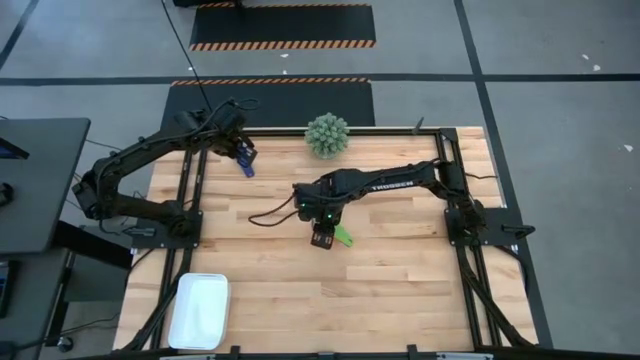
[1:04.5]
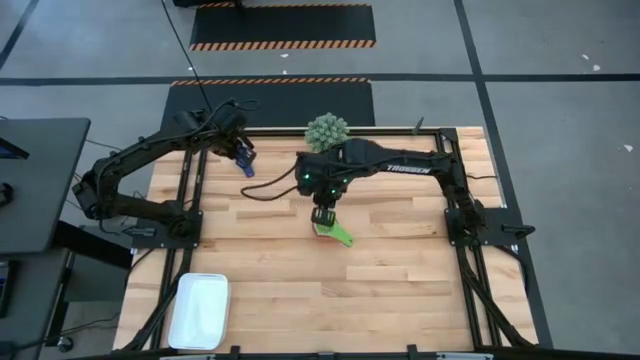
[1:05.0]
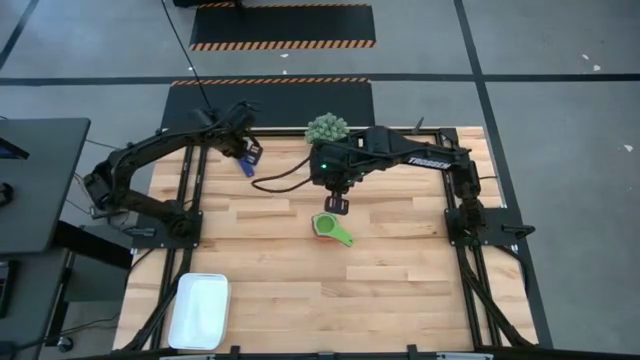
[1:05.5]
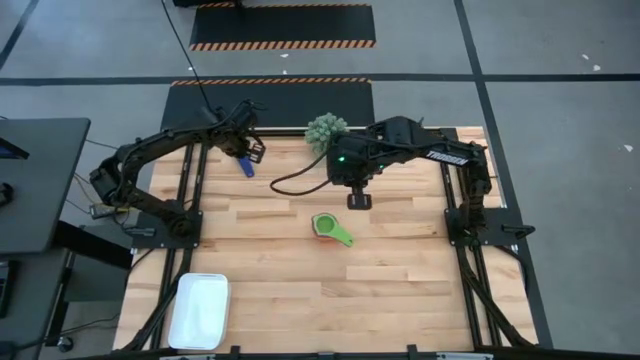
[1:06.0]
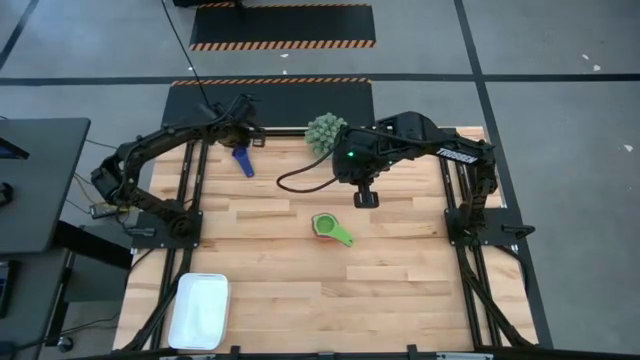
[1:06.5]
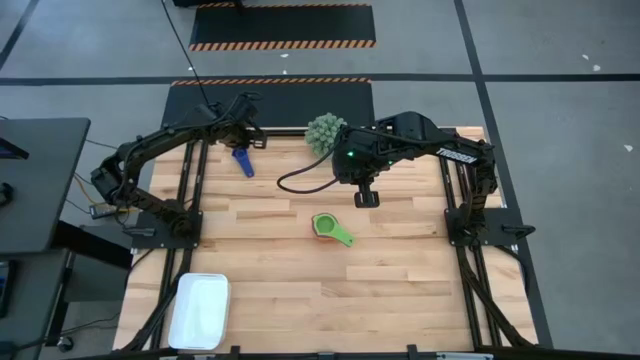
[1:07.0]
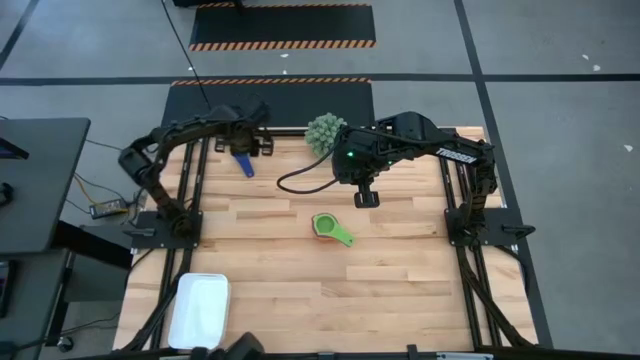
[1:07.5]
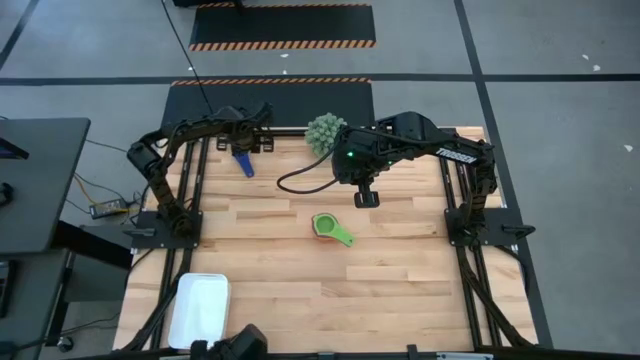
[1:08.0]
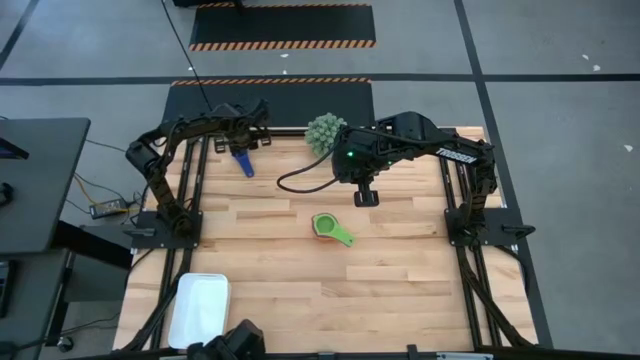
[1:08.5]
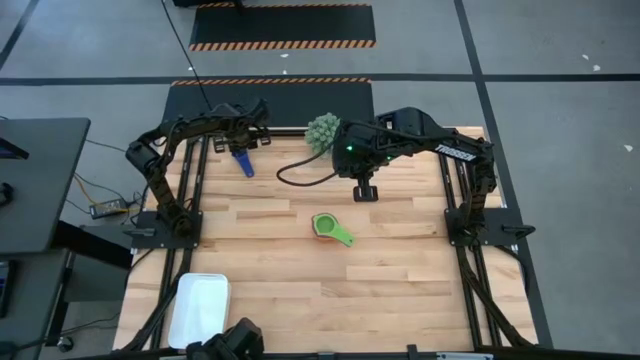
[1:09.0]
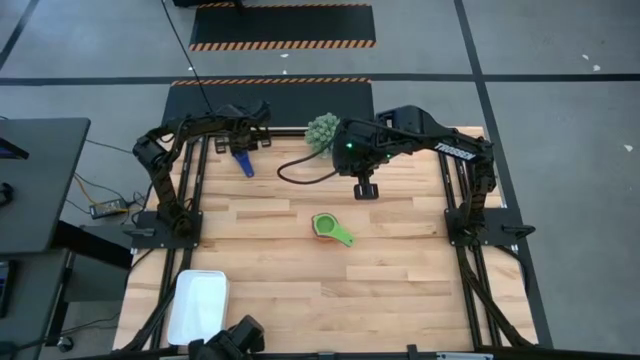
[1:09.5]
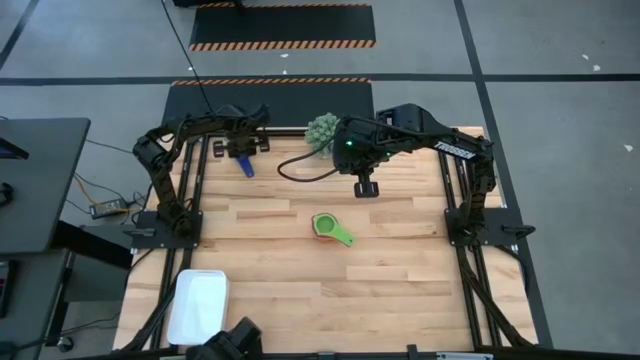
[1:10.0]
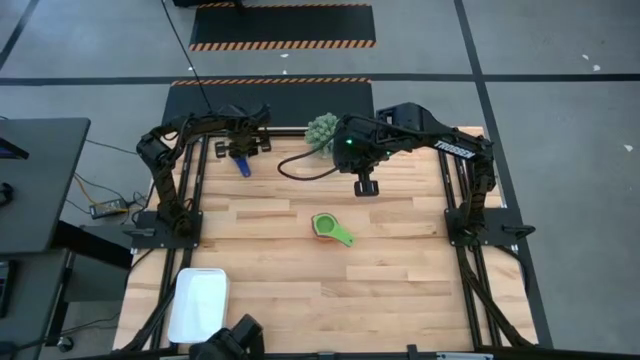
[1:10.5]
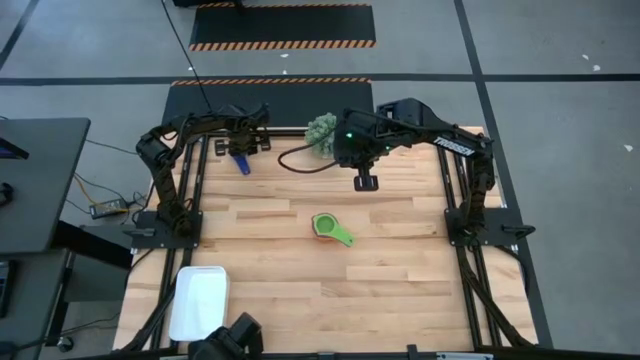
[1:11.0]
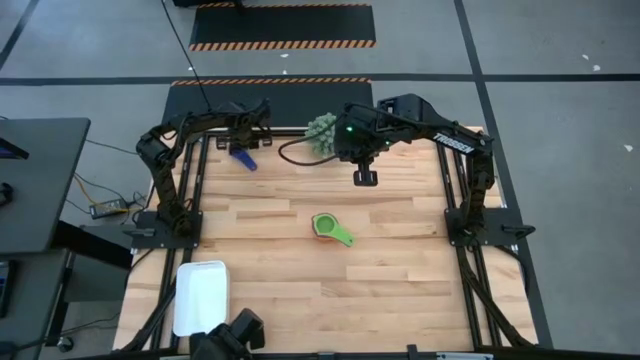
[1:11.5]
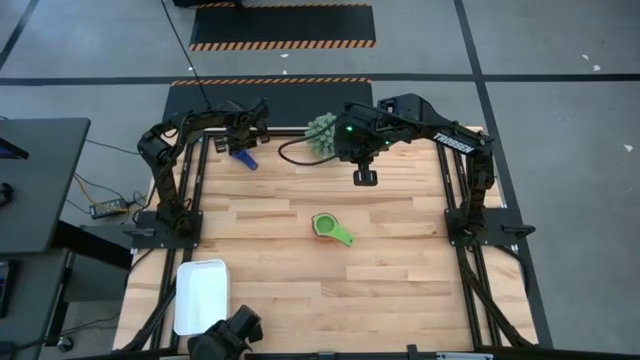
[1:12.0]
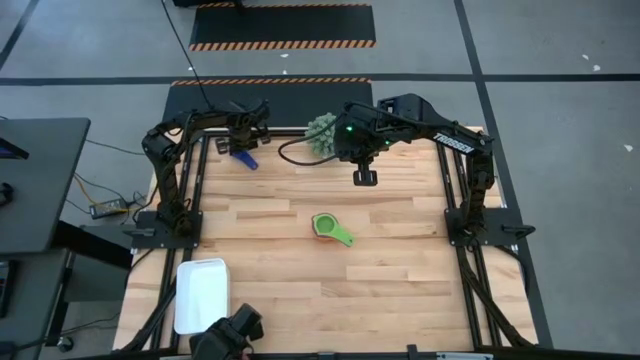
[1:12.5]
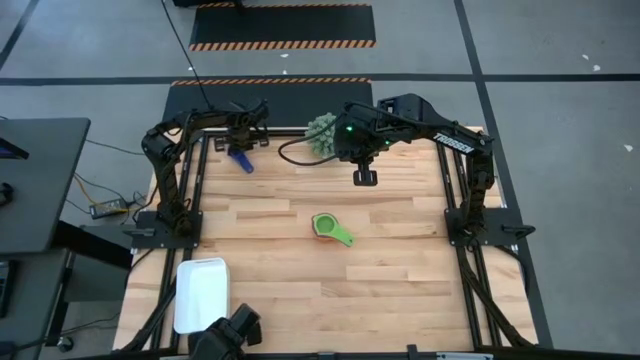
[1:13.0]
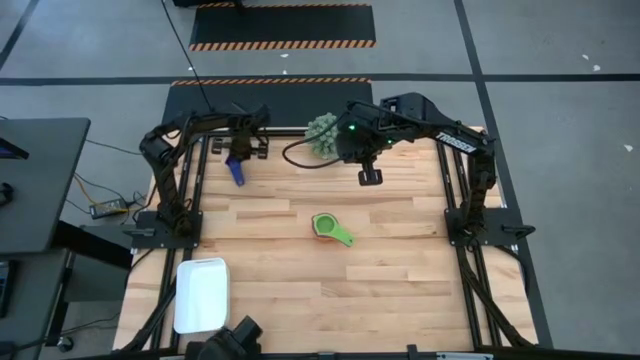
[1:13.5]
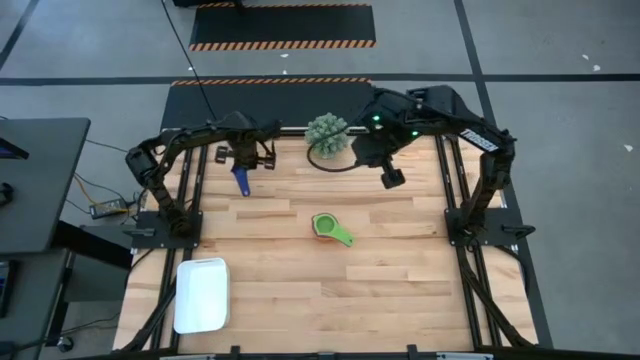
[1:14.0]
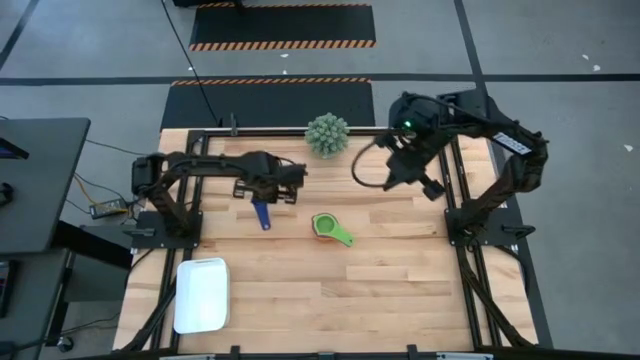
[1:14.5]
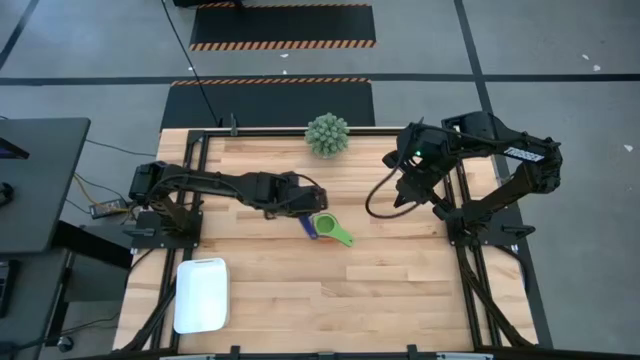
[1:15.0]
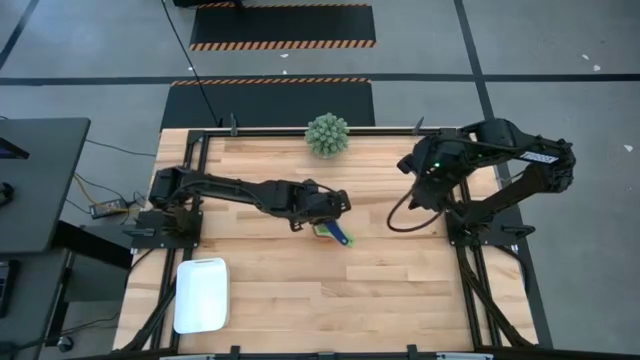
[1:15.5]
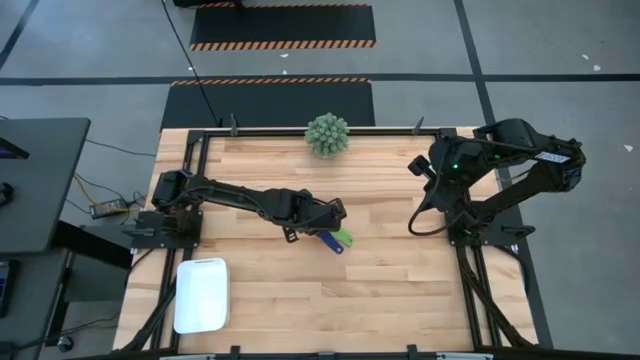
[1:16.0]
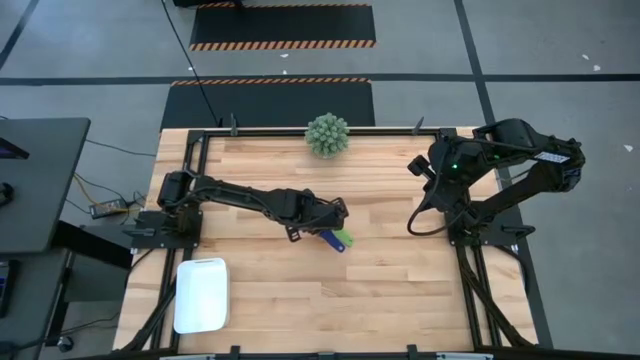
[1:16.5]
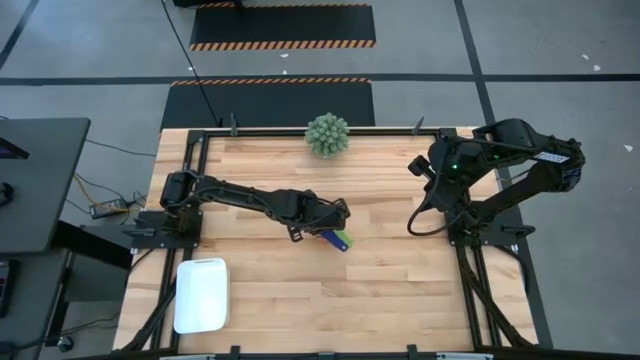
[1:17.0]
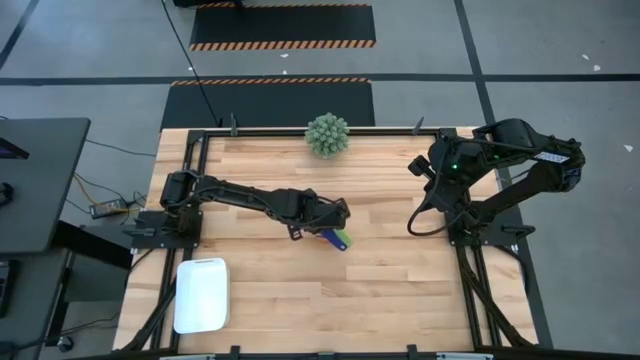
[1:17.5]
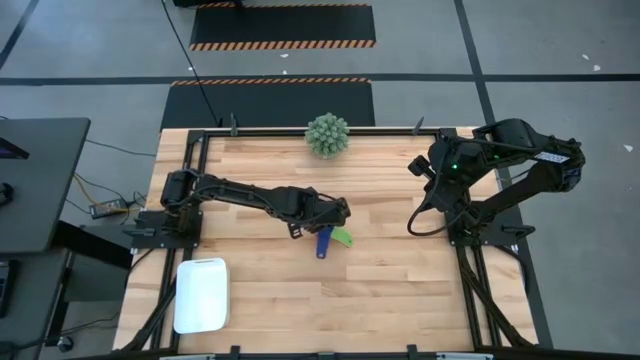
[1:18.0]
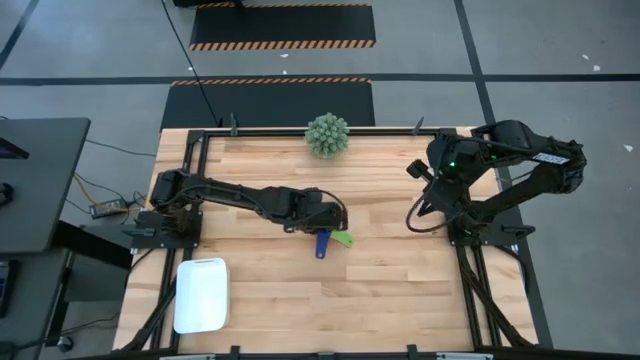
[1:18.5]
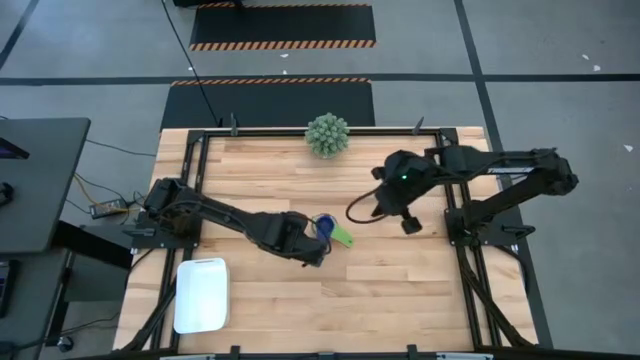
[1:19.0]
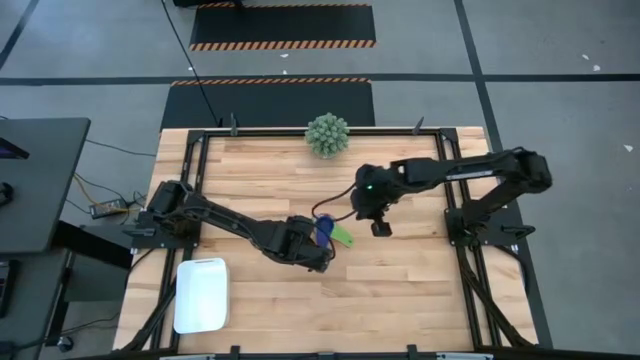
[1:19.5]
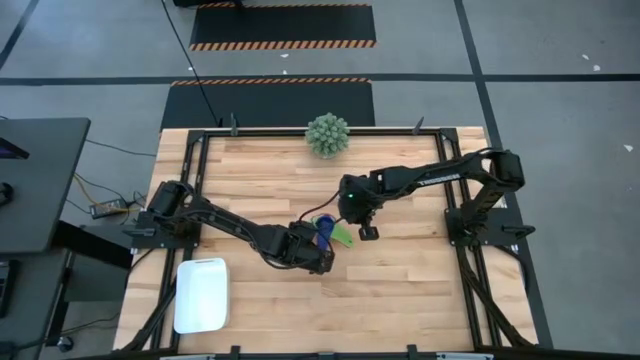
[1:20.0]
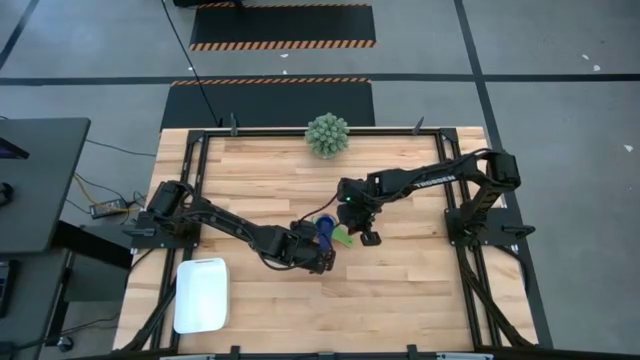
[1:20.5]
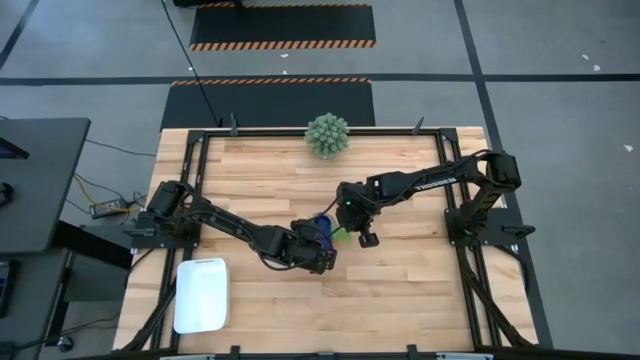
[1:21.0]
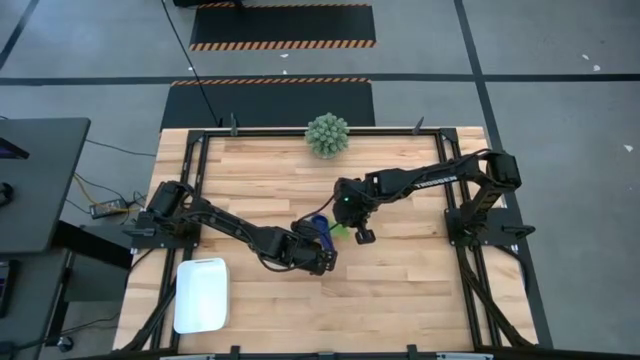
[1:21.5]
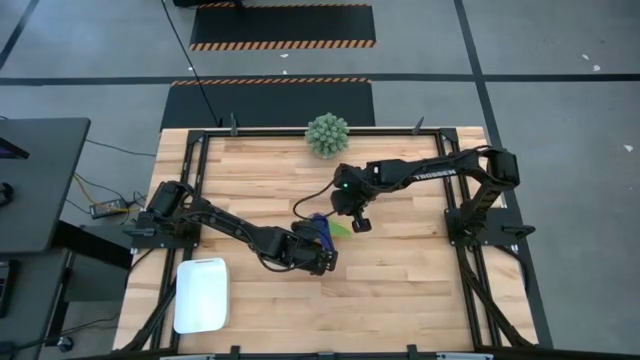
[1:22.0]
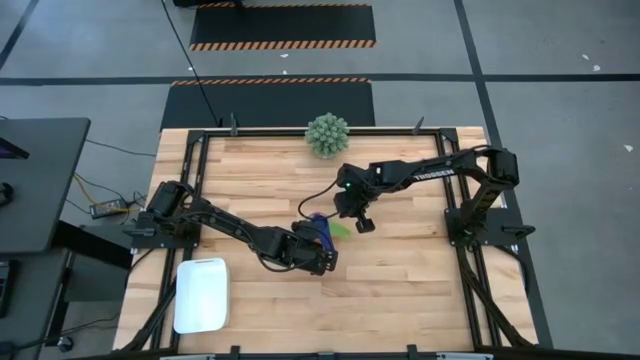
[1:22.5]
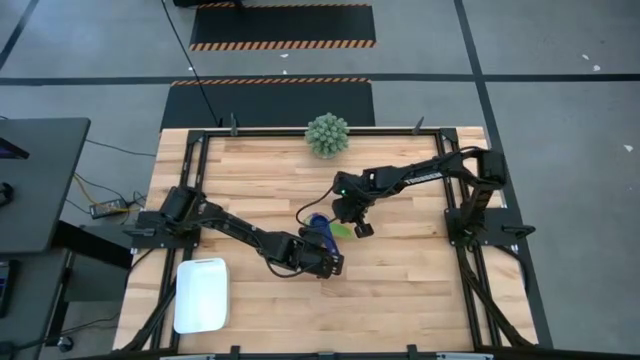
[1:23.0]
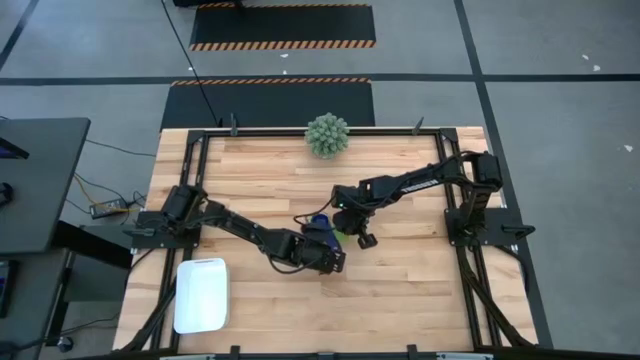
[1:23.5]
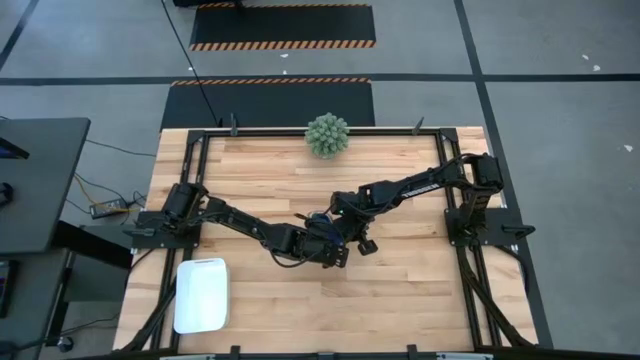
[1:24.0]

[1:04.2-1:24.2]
Task: Nest measuring cups in basket
Stack the purple measuring cup on top of the green measuring cup

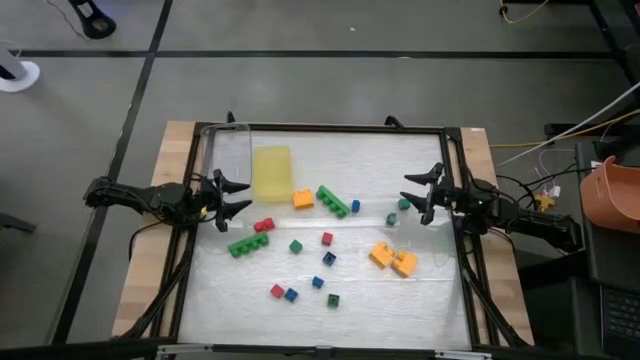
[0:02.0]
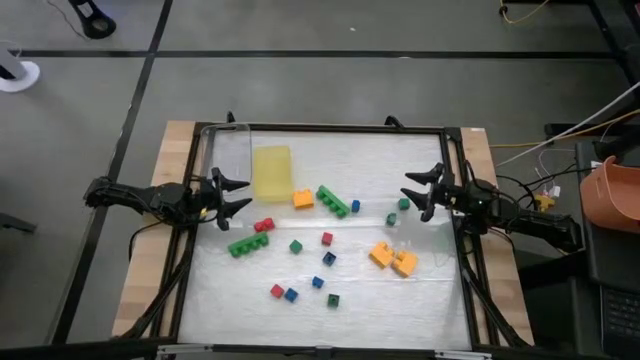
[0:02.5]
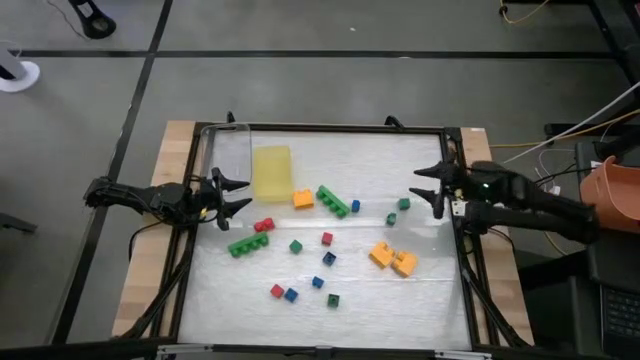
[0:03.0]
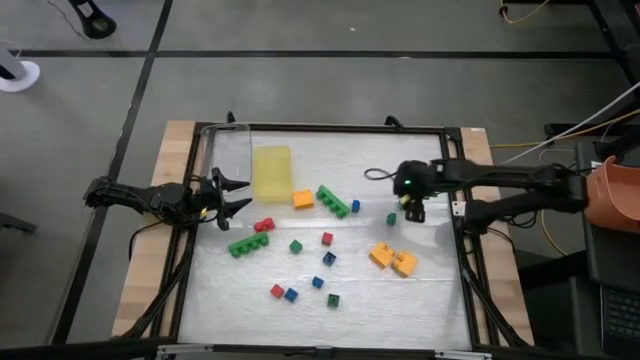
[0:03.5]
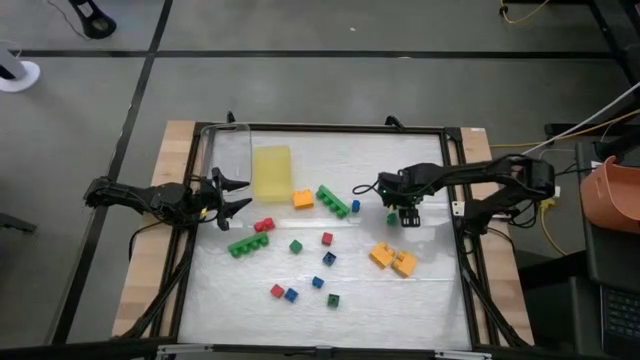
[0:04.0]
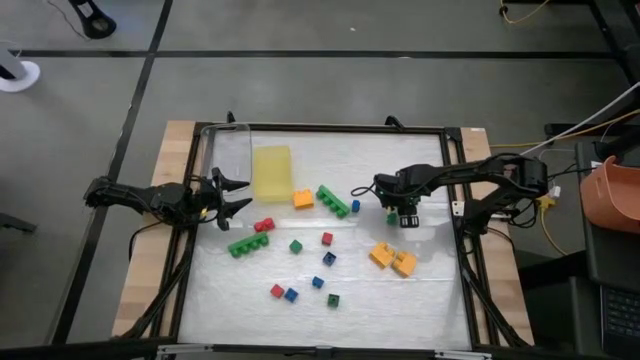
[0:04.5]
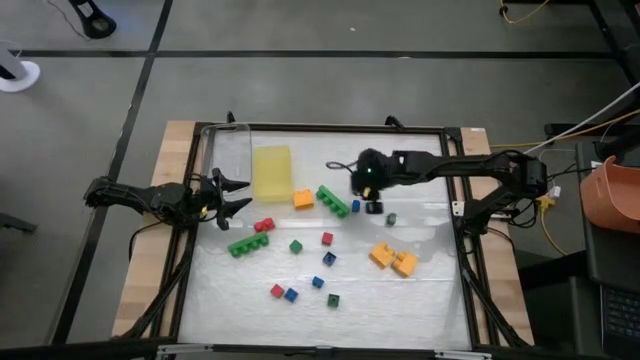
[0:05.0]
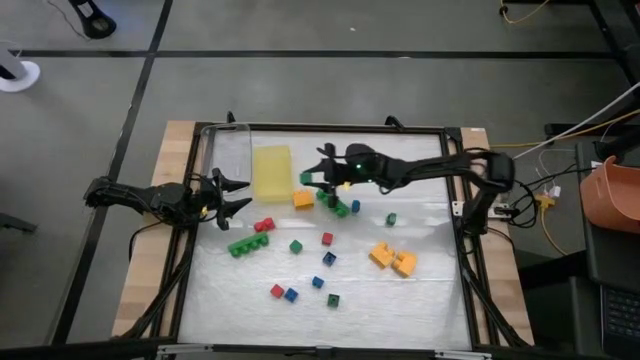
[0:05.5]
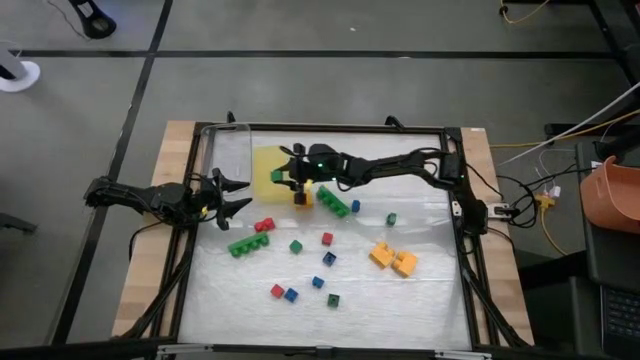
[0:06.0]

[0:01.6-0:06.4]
Task: Sort blocks by size
Put the small green game piece into the yellow bin
